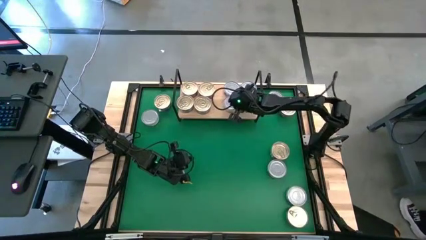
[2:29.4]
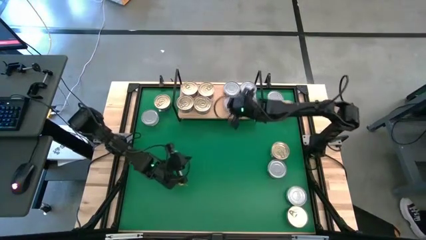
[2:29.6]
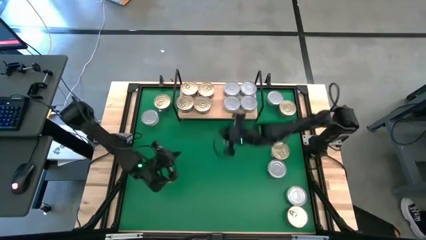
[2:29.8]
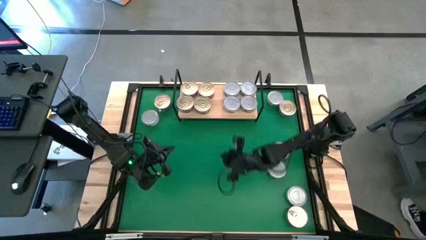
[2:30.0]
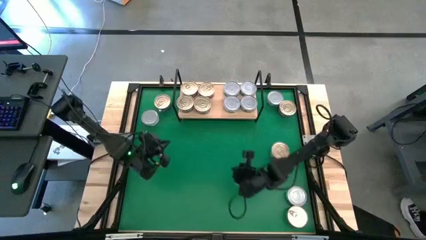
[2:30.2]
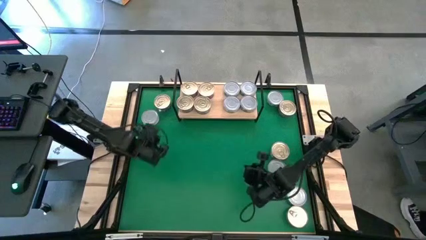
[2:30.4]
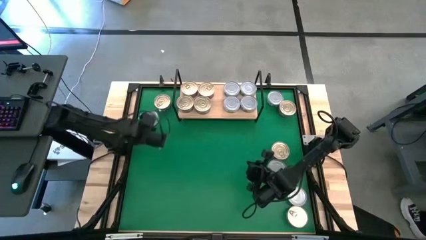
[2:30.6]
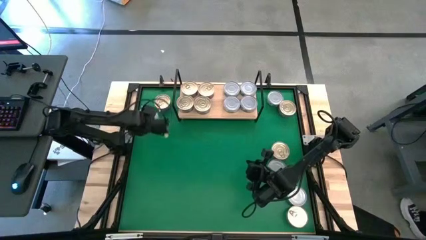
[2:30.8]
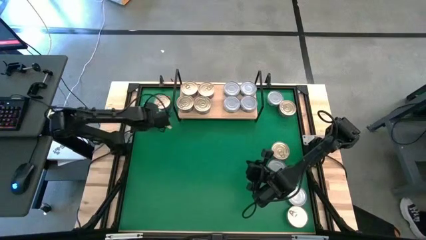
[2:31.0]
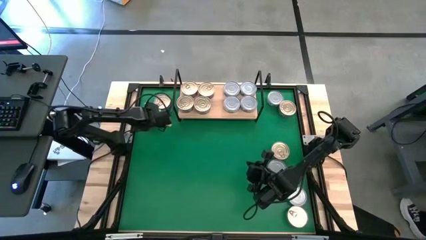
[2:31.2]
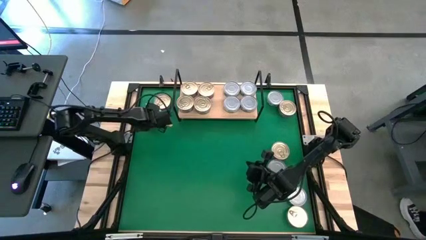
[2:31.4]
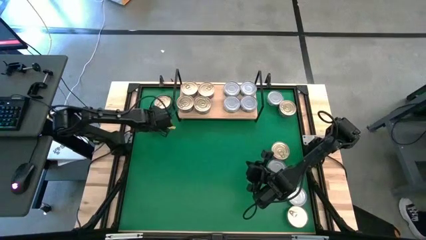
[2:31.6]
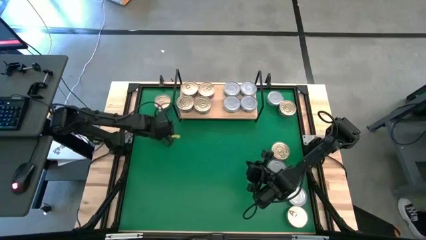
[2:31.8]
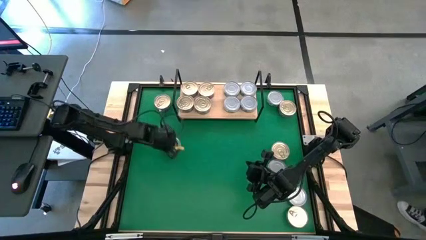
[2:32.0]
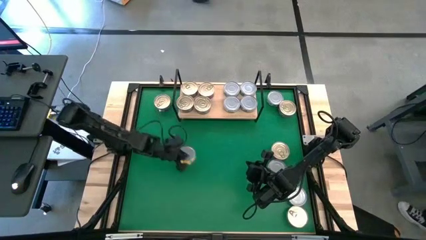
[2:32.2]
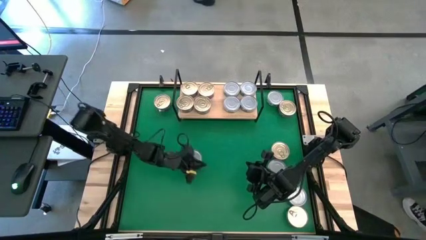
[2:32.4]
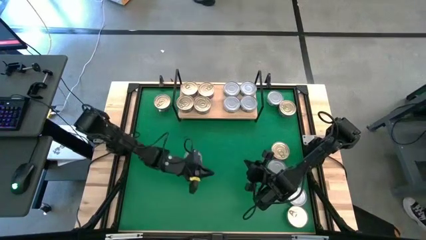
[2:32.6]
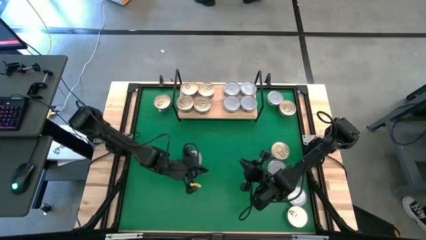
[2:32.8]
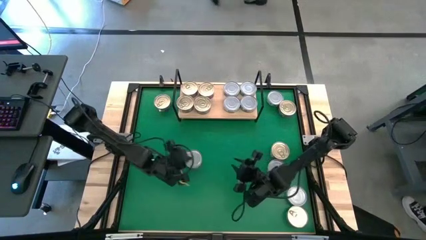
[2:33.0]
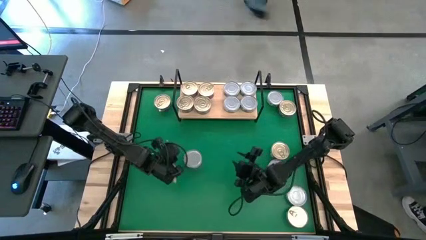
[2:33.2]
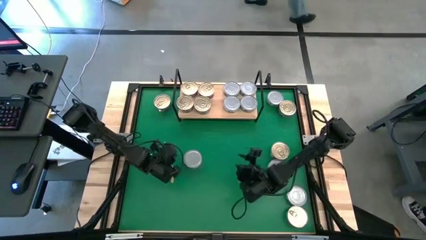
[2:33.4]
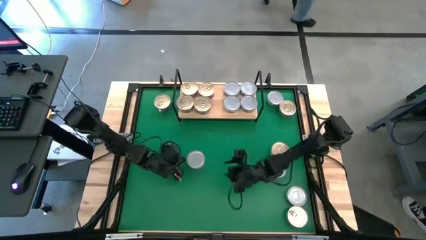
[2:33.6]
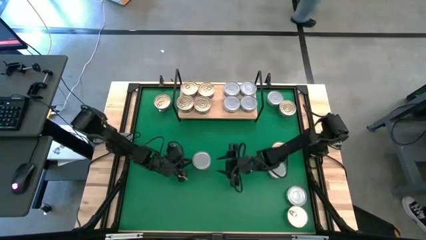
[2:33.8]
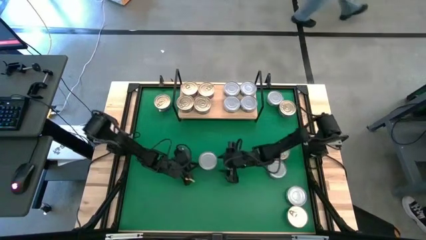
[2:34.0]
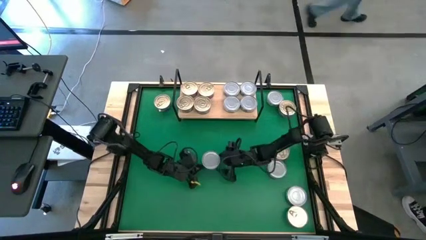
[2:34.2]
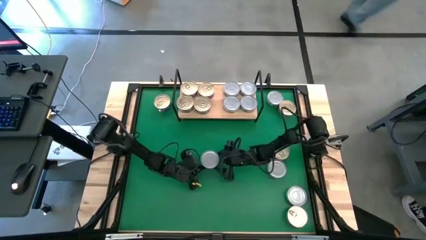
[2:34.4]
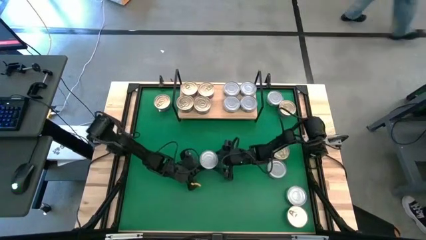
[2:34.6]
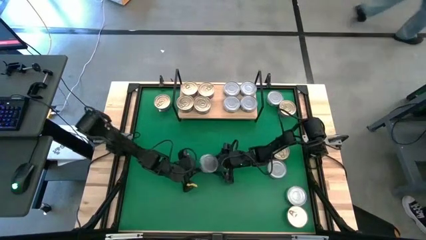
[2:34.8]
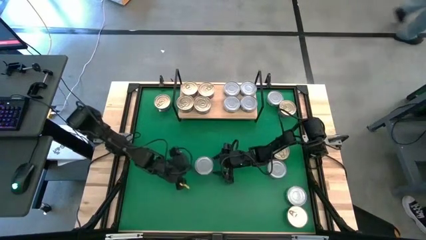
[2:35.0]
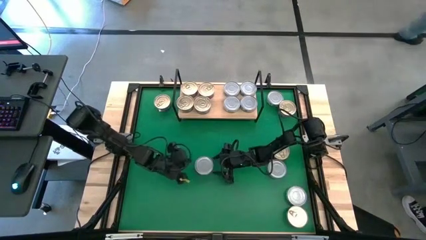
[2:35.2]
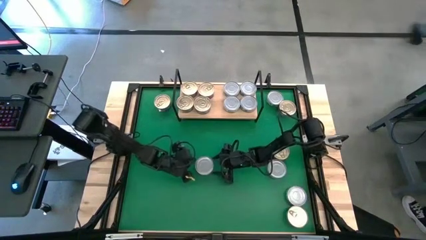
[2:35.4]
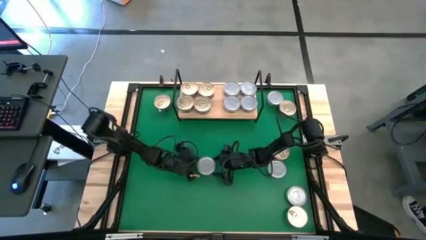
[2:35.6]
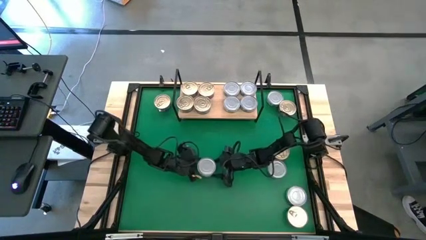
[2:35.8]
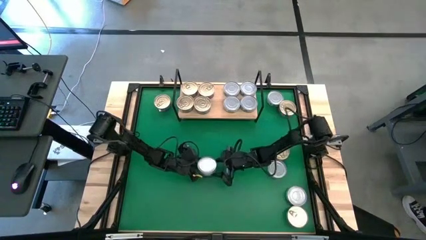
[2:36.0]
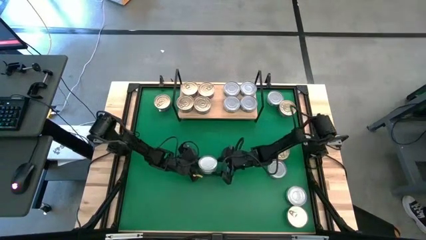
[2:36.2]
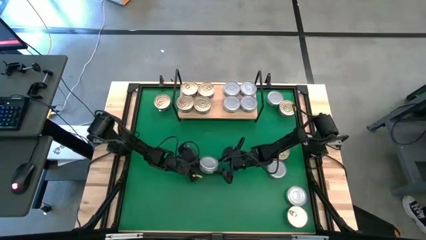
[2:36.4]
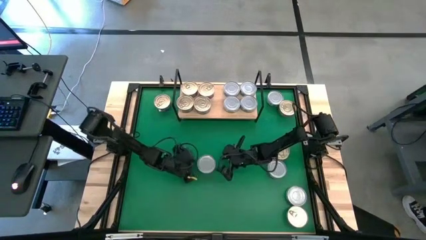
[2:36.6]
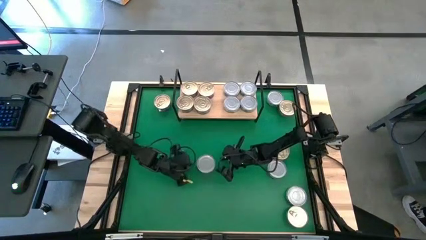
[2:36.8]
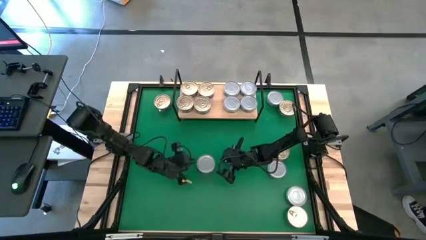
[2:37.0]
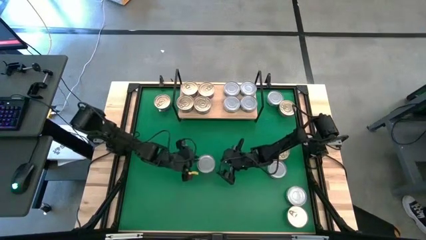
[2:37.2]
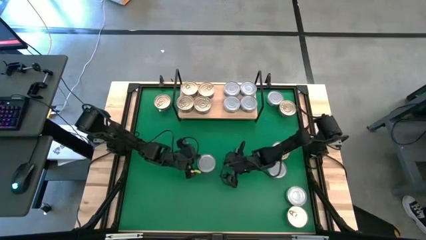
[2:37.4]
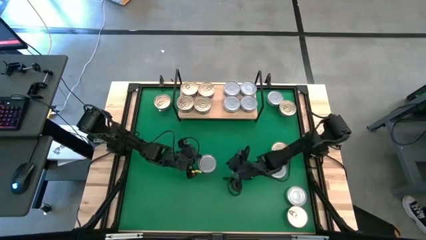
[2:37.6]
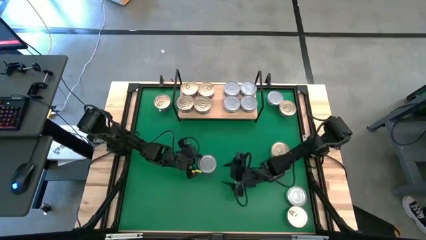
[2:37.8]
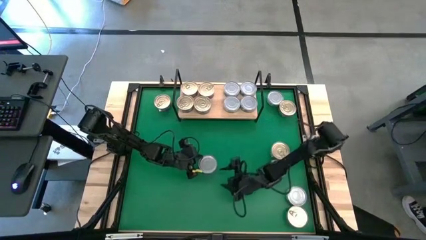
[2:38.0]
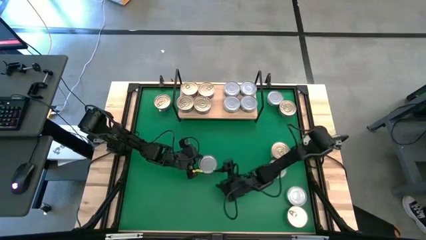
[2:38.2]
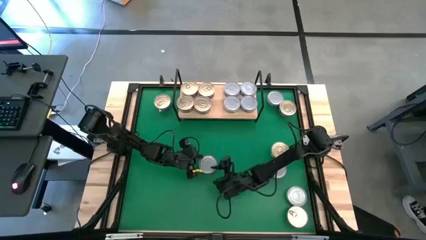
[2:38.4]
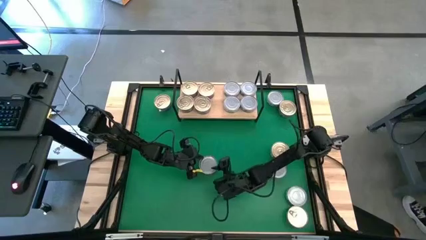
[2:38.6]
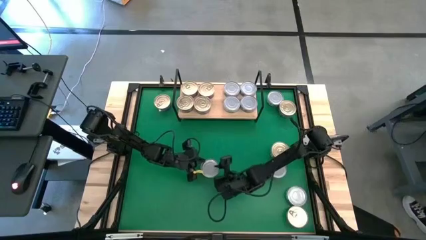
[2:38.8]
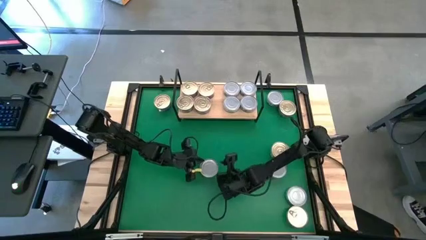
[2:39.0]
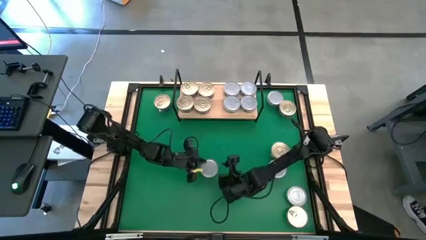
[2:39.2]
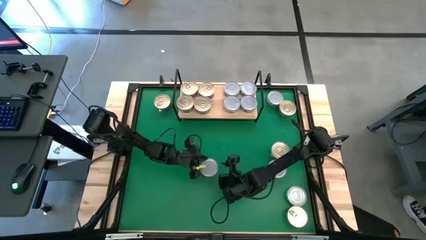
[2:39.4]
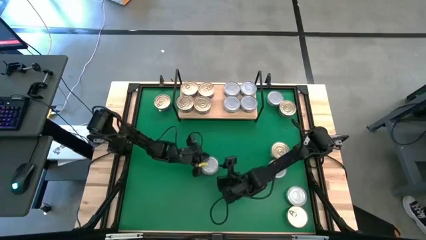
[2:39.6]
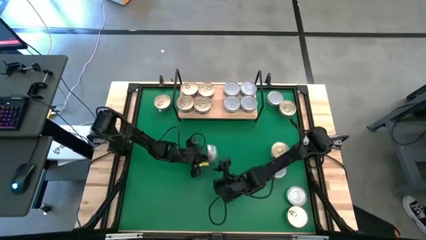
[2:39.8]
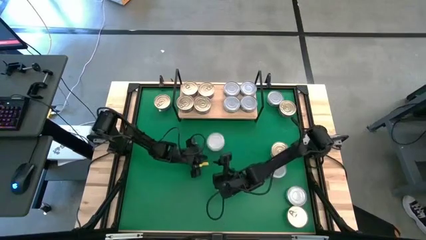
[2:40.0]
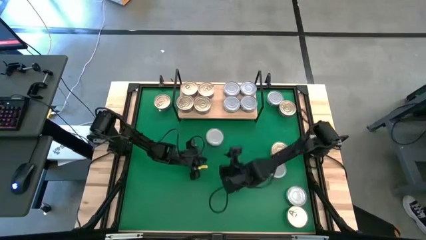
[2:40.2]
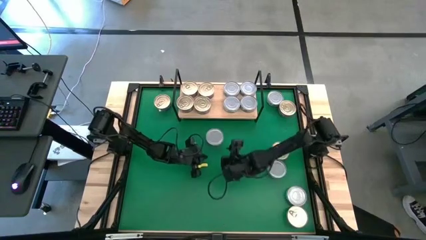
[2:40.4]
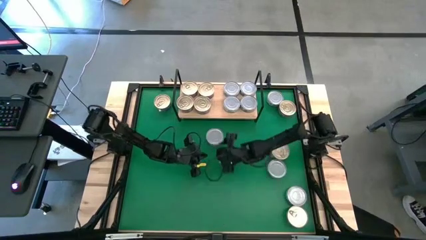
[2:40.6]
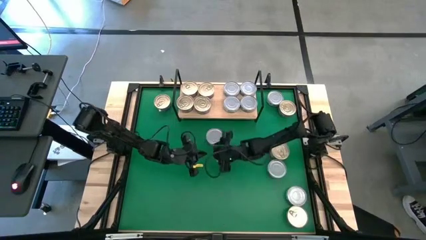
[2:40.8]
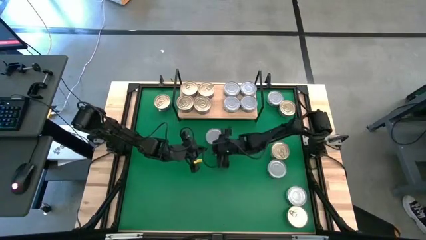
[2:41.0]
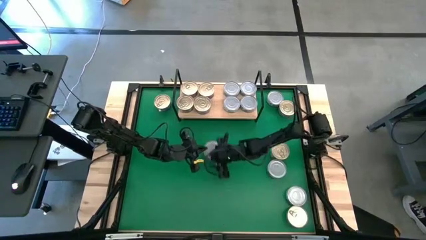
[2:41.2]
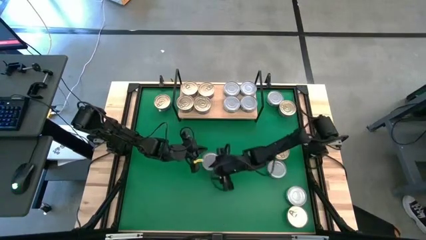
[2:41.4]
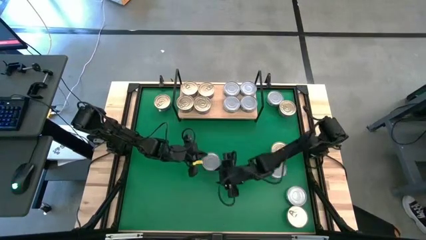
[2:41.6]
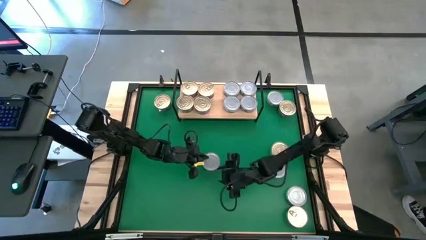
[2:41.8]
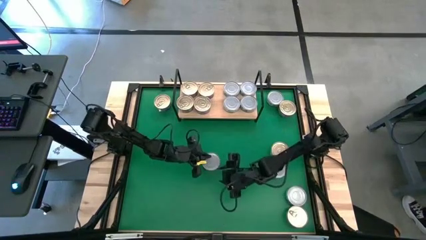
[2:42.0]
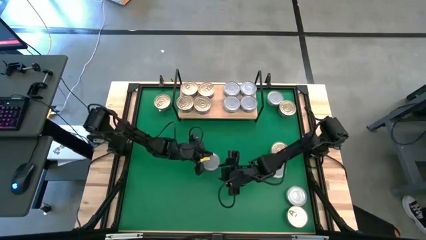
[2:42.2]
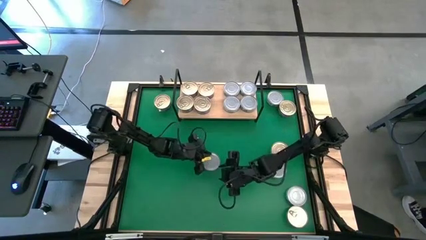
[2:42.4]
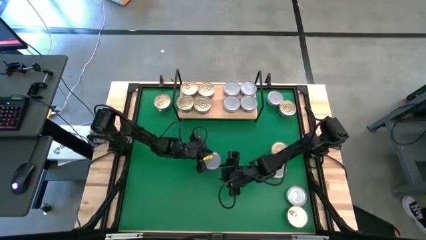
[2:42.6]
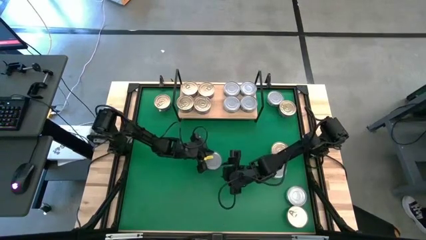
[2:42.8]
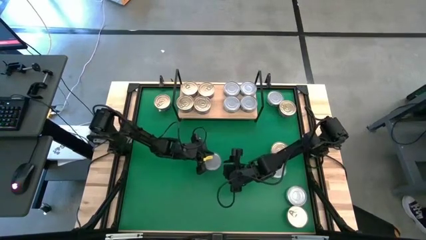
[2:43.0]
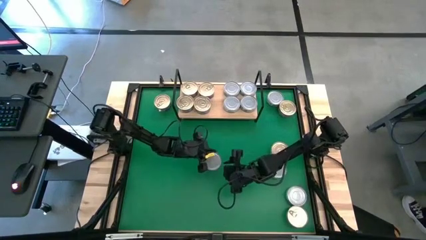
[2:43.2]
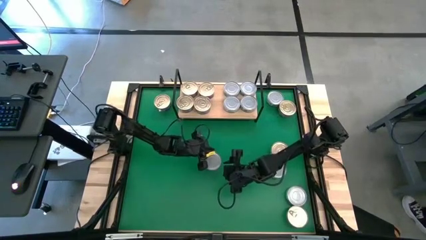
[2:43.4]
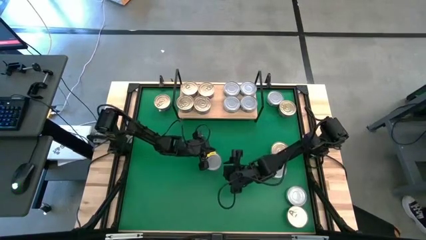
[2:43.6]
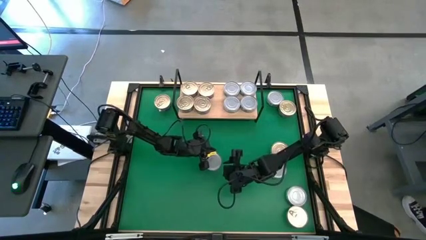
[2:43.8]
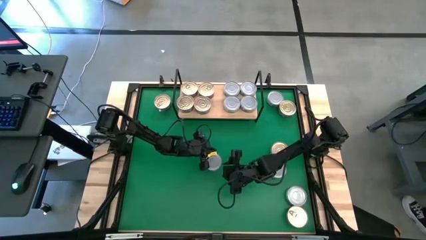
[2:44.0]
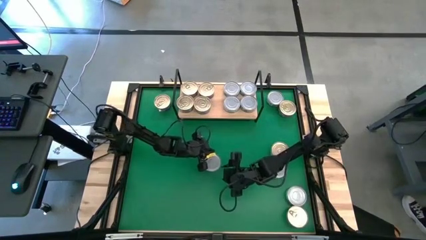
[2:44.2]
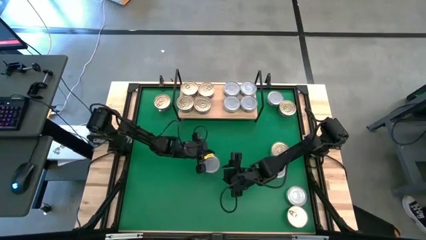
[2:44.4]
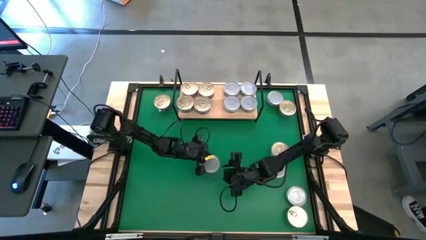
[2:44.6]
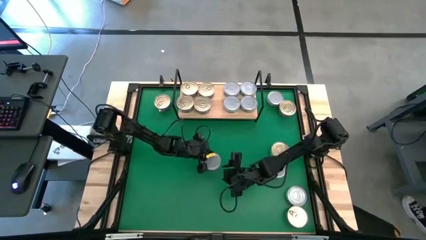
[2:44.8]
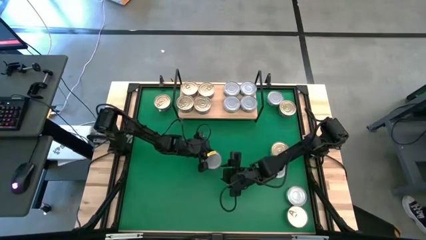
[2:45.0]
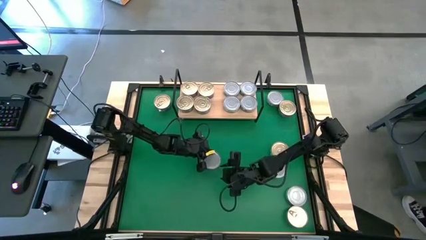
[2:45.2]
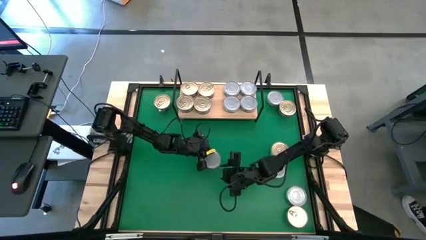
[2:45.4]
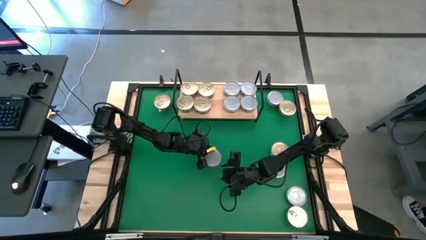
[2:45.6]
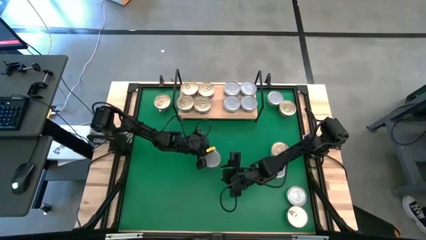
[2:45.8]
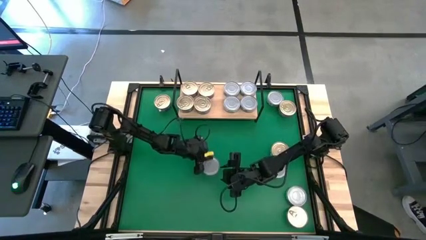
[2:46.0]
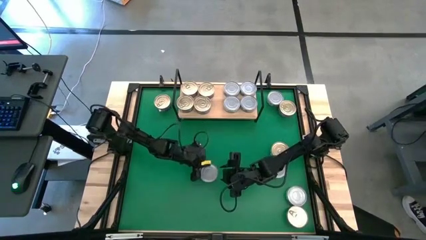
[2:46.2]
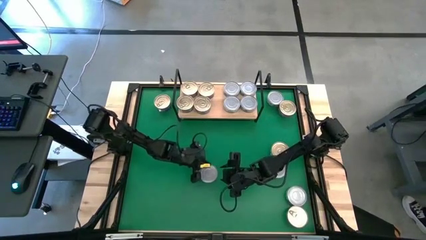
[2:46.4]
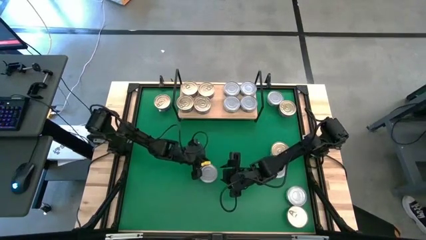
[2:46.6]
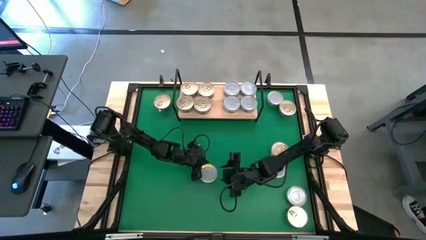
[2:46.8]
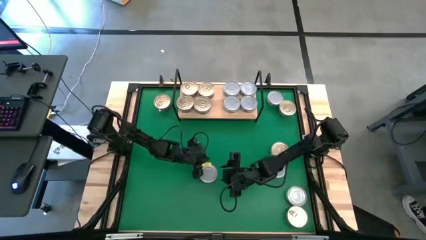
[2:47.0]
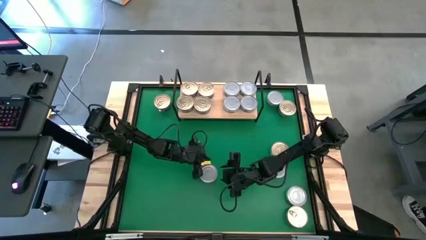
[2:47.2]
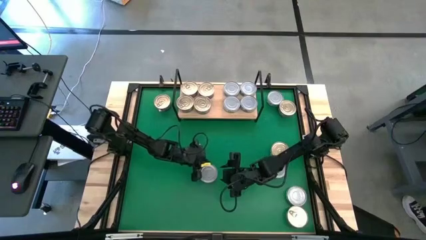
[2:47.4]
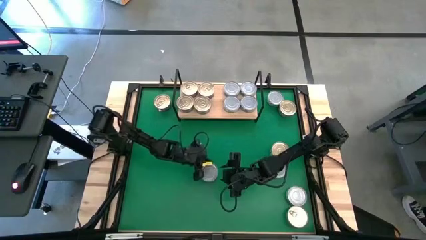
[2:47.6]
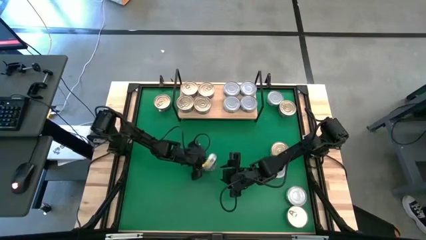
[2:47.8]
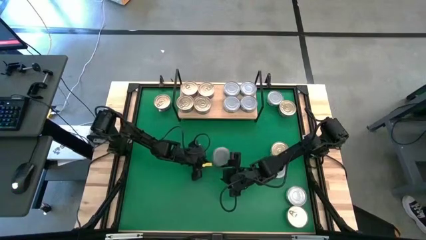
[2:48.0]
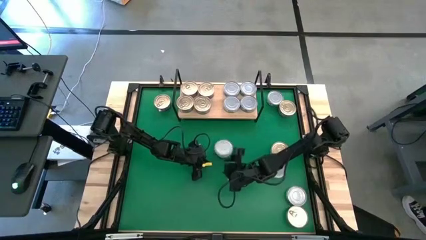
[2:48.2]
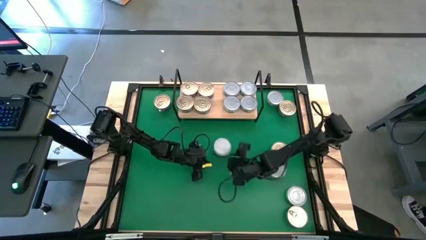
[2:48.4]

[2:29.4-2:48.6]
Task: Stack canned seafood by type on shelf
Put the green white tuna can on the shelf
